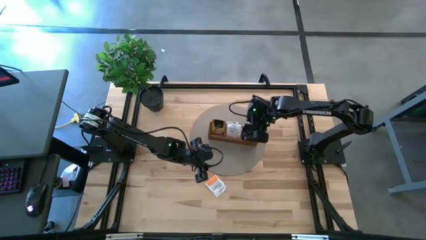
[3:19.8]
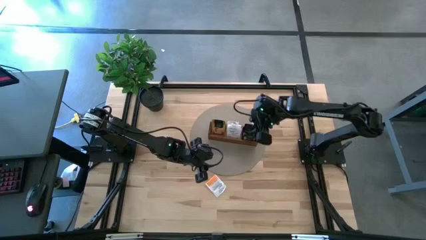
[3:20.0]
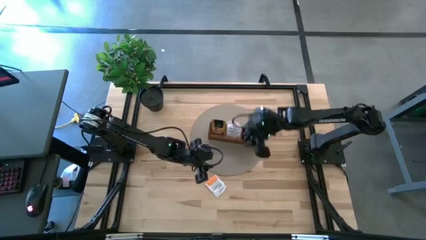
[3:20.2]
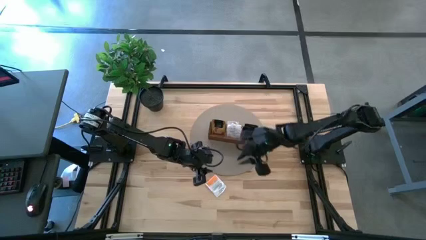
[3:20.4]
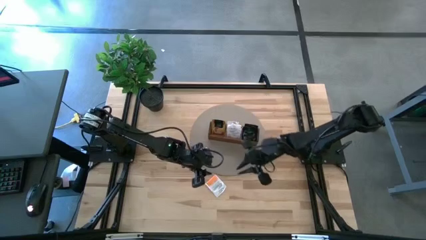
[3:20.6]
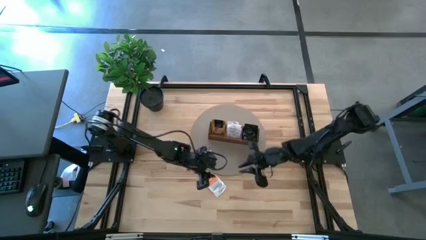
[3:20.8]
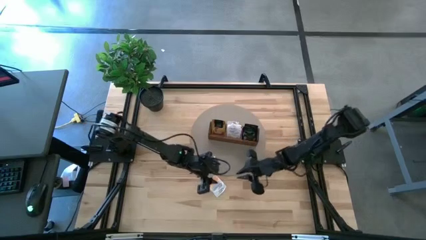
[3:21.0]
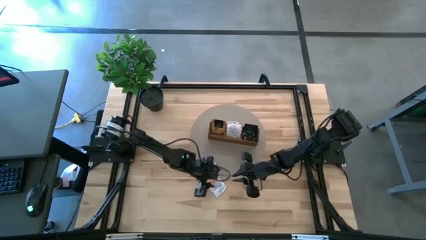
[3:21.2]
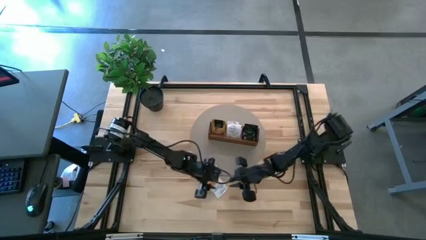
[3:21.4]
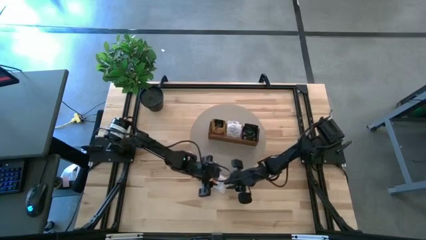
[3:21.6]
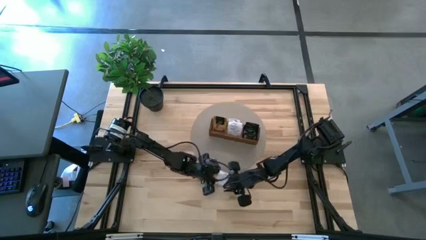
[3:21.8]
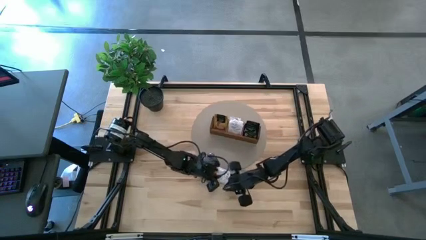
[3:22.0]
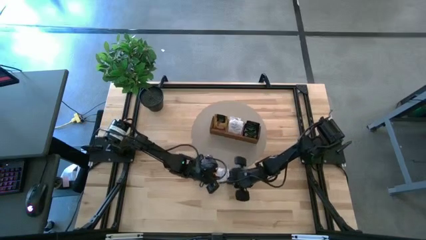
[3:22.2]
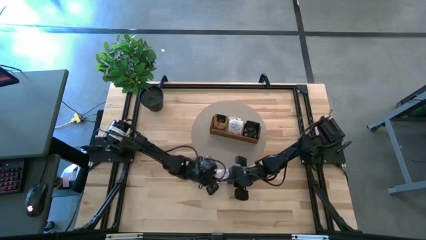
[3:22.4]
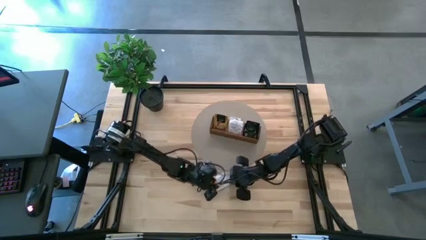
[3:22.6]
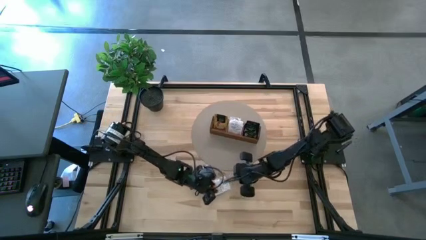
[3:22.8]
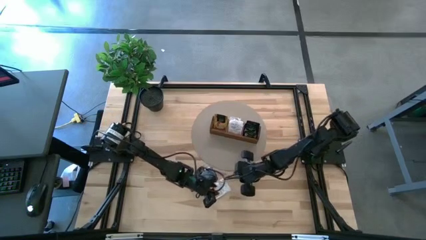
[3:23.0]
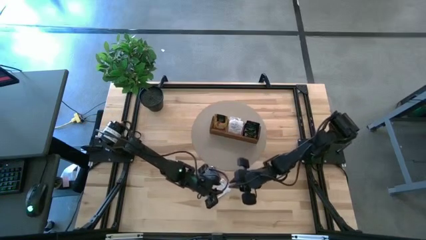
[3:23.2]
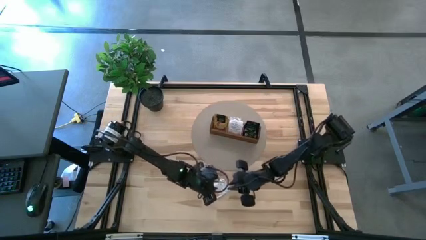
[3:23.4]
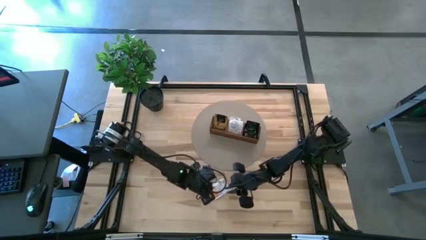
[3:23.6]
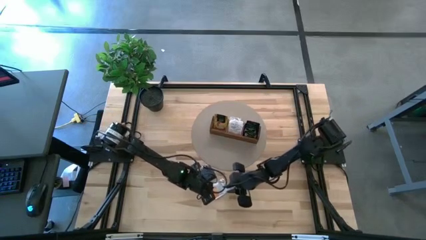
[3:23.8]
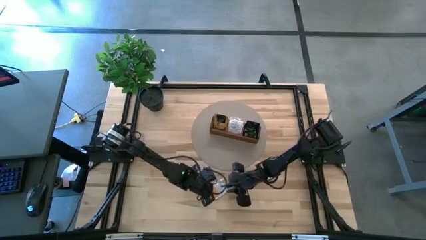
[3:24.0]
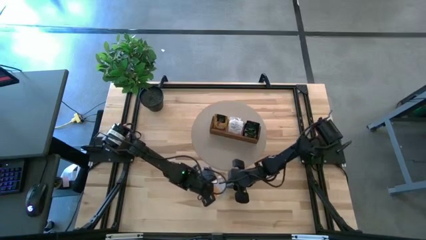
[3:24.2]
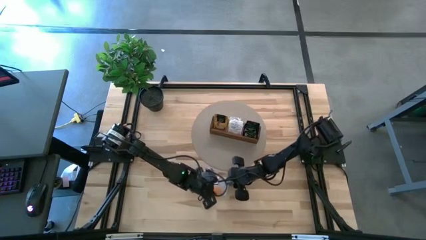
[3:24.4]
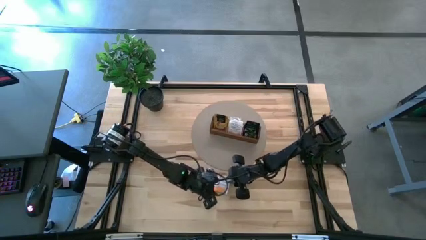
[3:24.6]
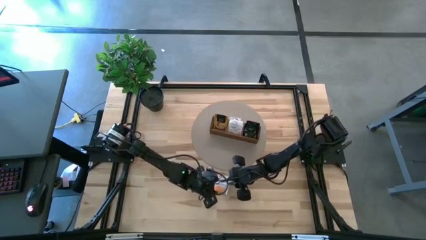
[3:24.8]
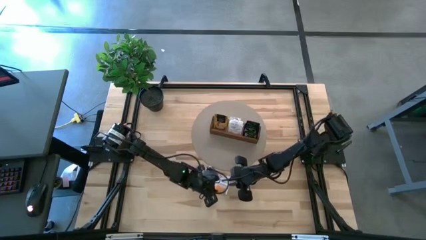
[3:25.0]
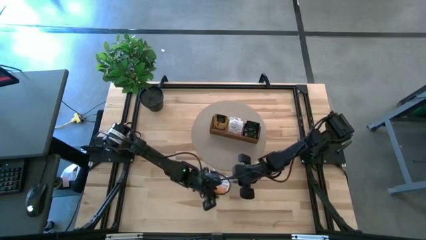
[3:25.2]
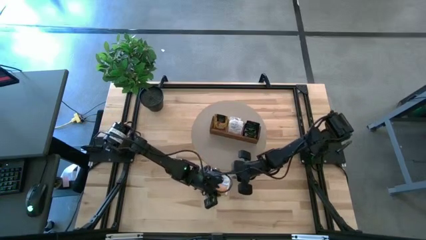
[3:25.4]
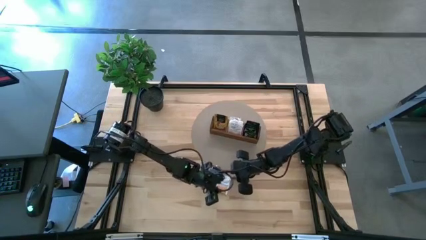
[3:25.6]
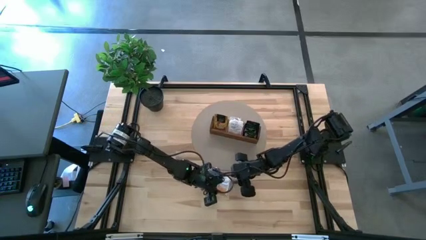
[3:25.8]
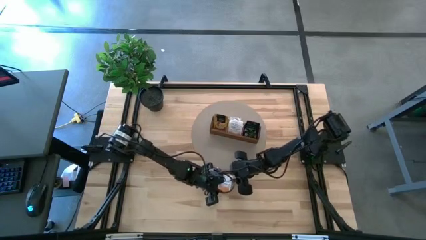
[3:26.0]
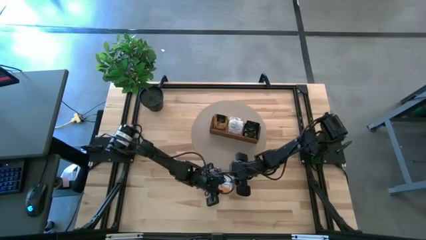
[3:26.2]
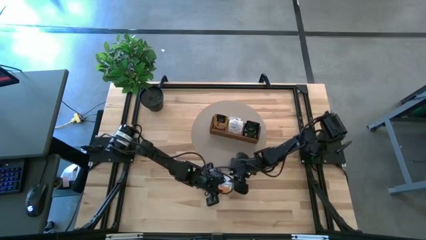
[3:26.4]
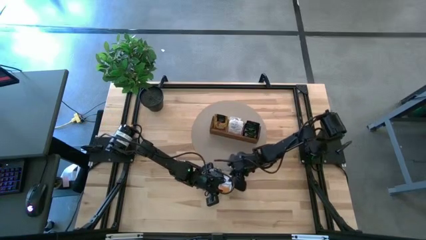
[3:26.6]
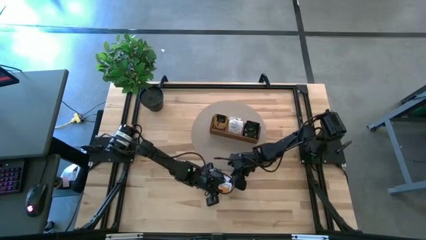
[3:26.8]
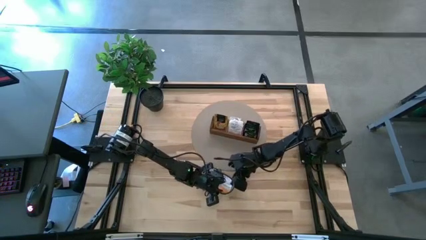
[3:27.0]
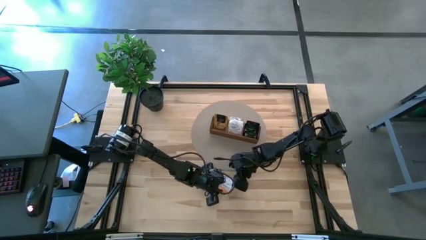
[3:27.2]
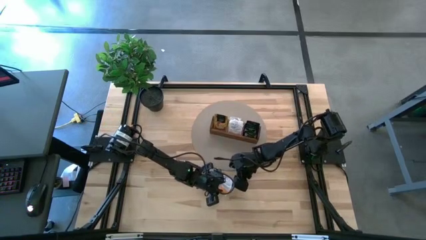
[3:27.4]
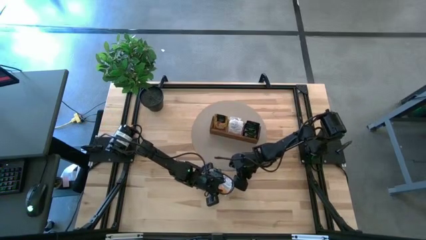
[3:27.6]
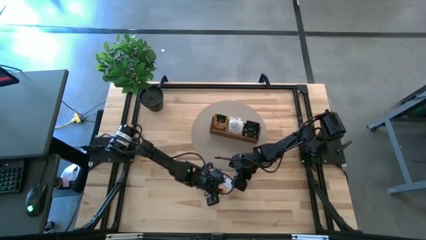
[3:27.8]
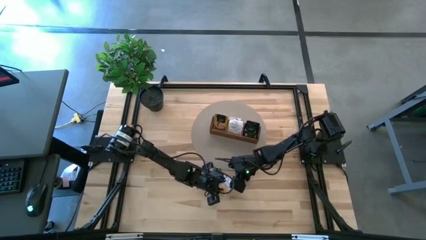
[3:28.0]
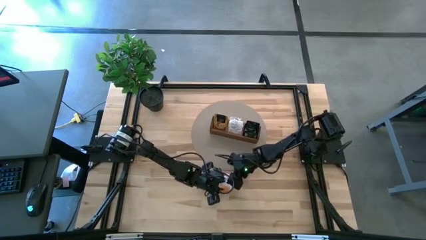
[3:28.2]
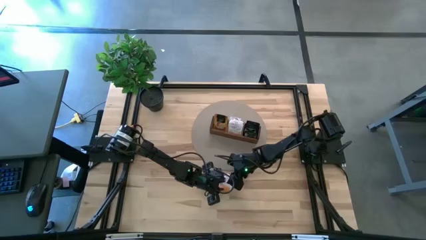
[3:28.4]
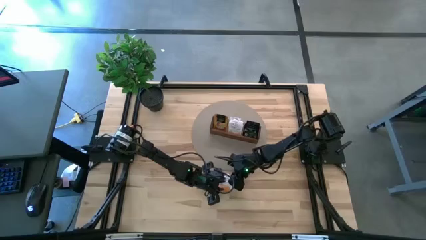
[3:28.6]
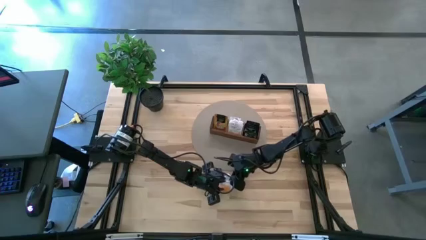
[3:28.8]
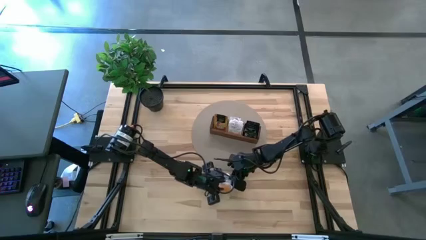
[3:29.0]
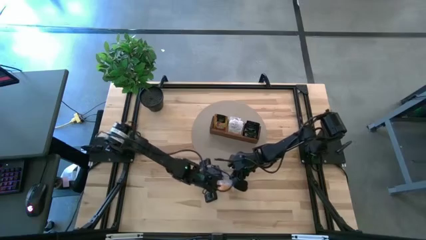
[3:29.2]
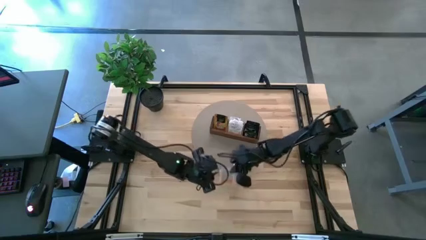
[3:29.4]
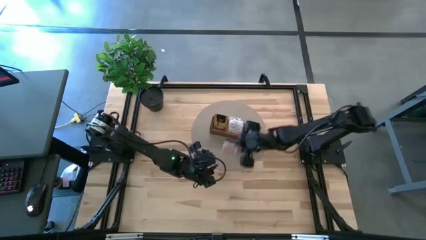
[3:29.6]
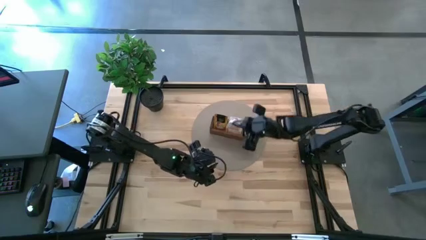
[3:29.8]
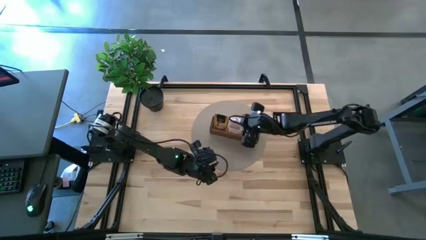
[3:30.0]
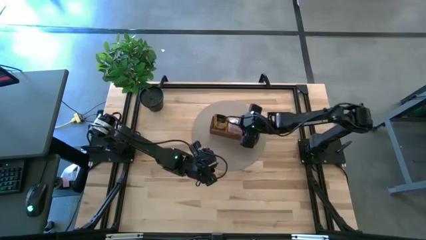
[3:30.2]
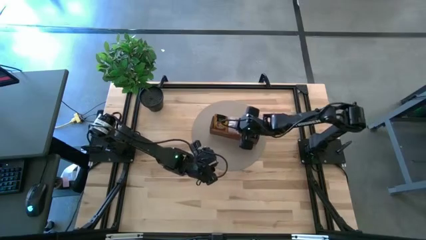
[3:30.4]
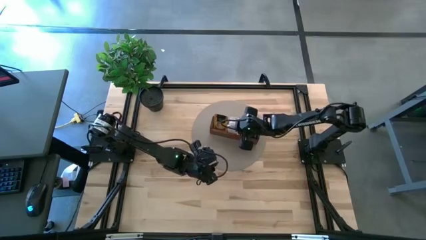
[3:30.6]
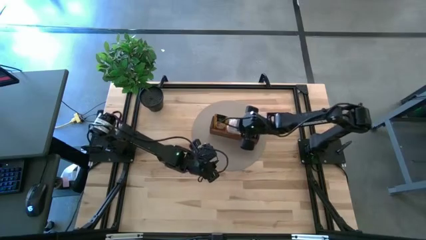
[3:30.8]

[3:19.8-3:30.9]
Task: Pick & Place Tea
Put the white tea bag into the middle section of the wooden organizer

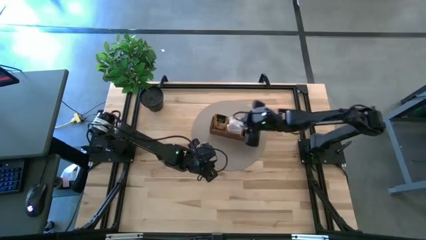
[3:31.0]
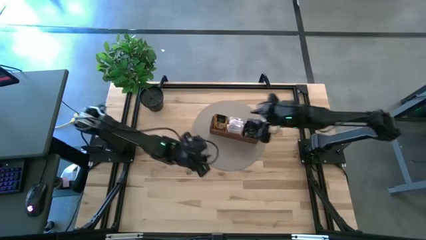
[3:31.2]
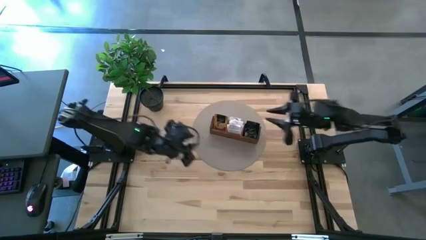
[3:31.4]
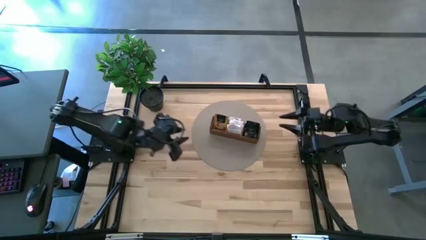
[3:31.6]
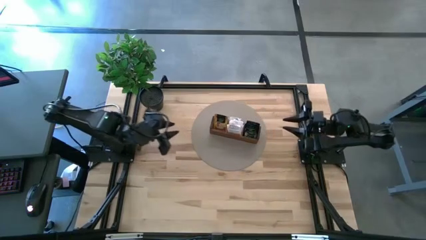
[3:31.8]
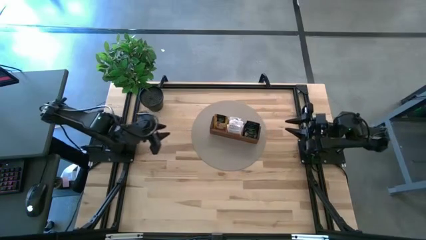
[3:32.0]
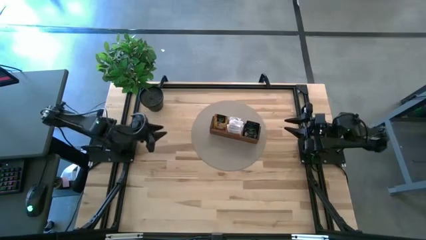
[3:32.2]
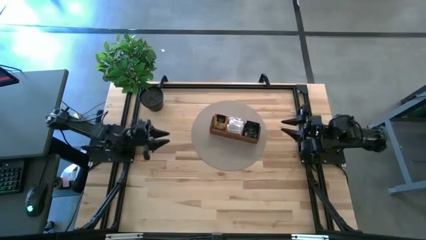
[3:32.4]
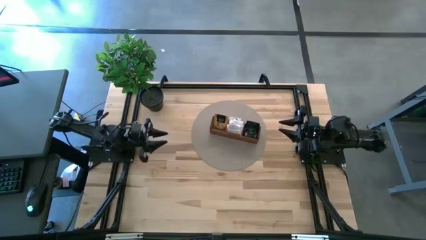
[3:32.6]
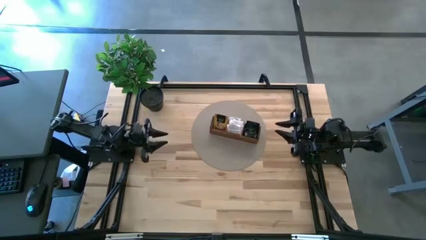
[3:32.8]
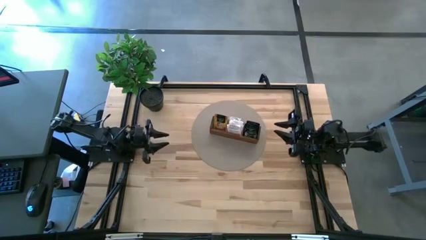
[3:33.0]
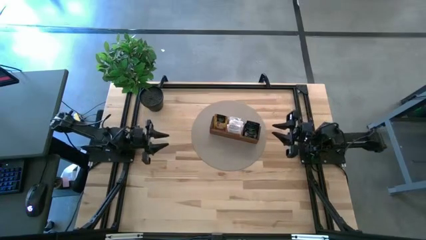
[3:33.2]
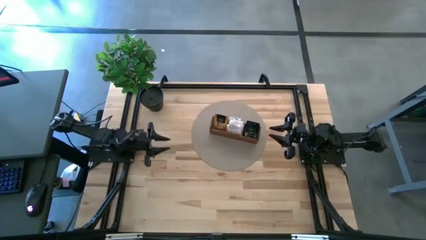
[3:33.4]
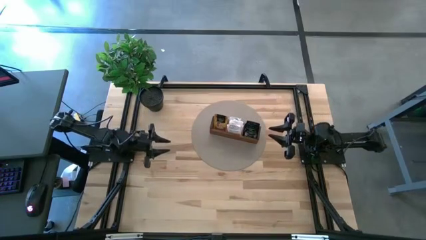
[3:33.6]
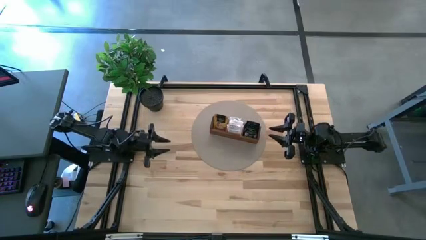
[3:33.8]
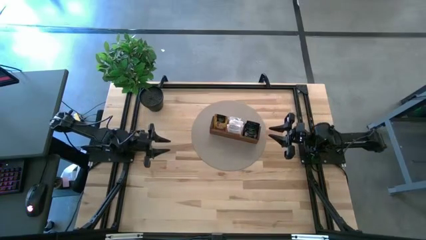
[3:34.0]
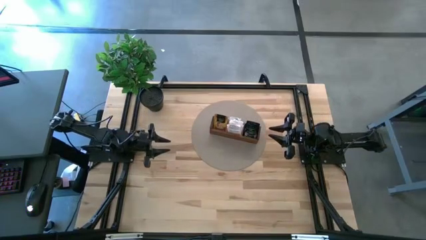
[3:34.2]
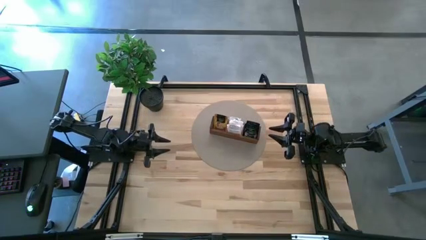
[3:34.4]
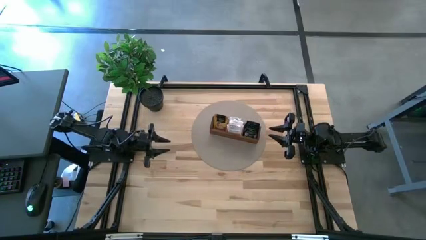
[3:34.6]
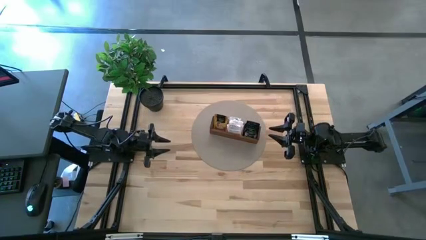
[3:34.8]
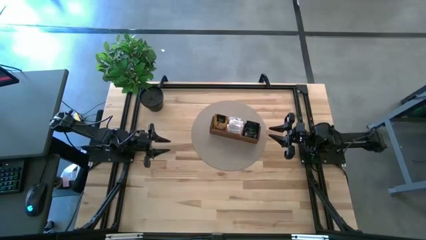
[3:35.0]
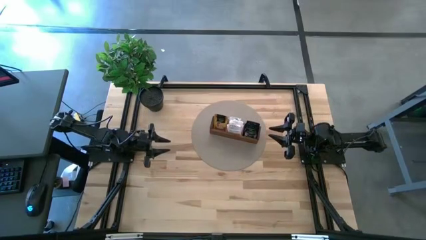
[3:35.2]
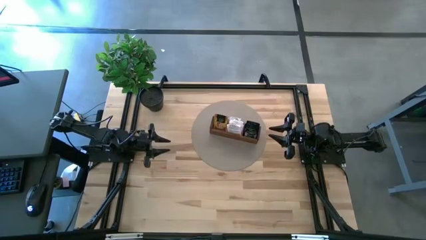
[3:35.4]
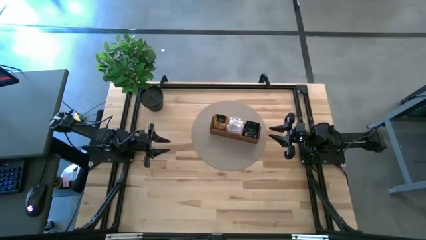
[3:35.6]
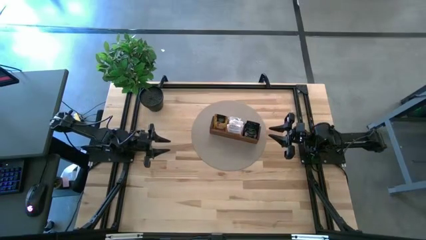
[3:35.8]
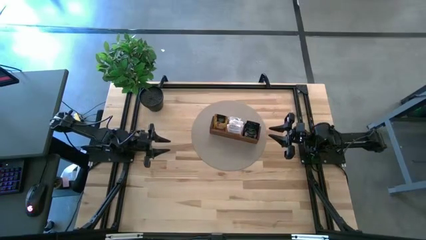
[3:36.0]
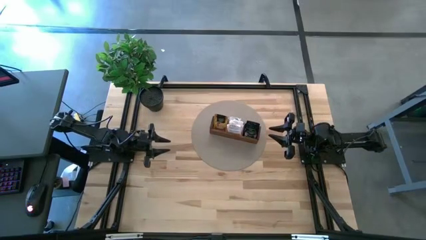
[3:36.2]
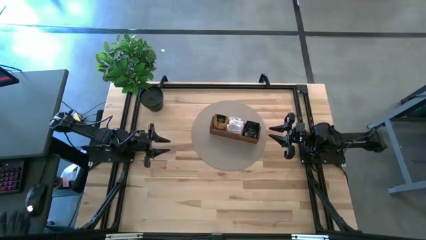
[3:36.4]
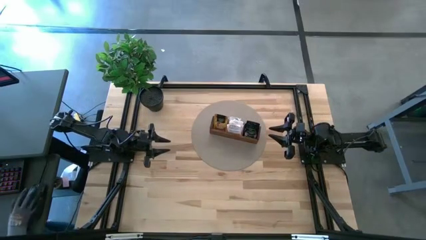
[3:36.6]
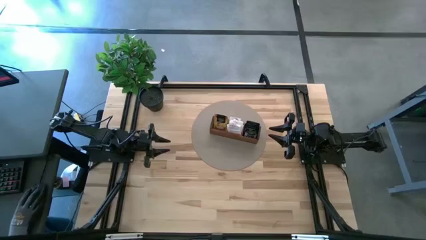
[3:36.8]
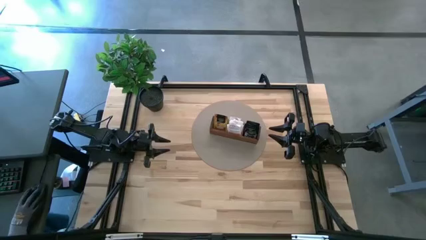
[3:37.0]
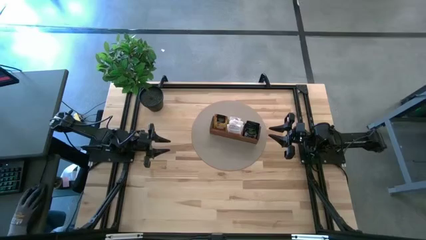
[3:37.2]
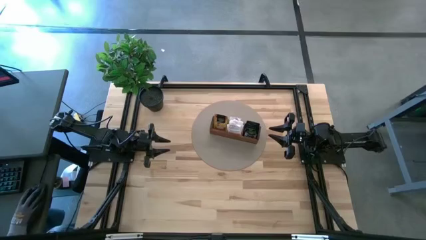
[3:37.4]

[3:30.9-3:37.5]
Return to Home Position
